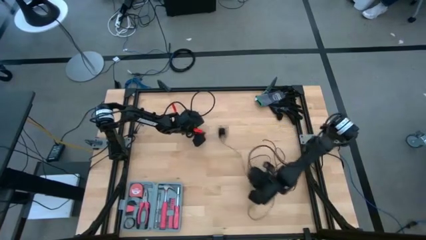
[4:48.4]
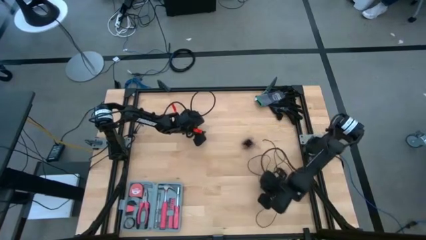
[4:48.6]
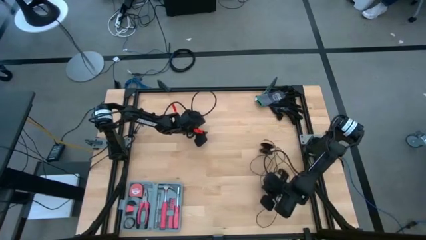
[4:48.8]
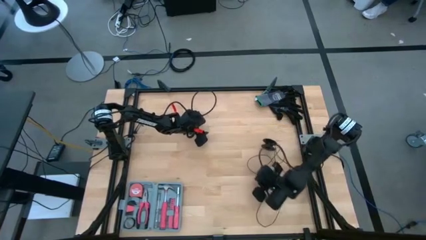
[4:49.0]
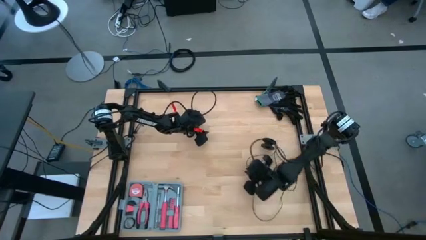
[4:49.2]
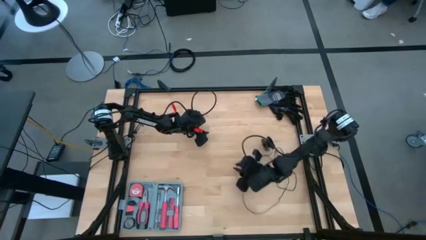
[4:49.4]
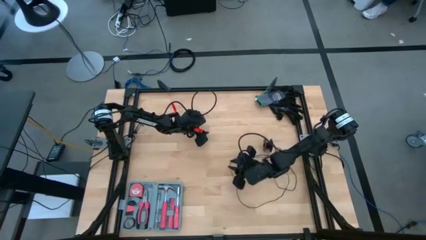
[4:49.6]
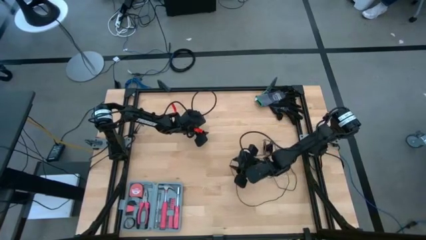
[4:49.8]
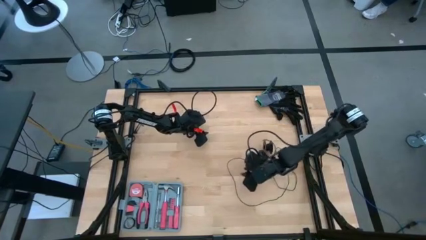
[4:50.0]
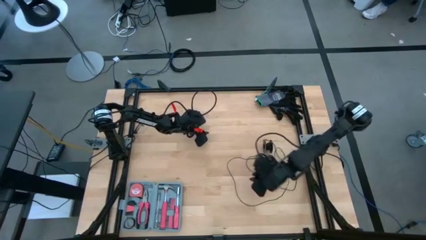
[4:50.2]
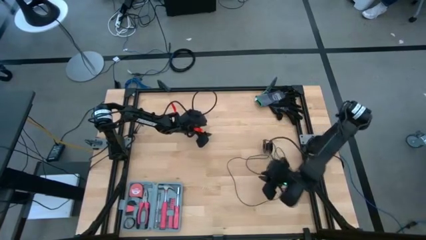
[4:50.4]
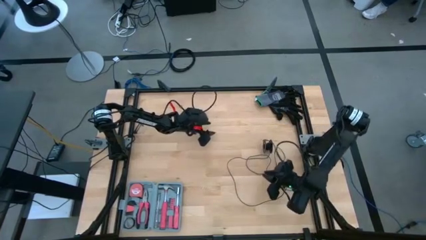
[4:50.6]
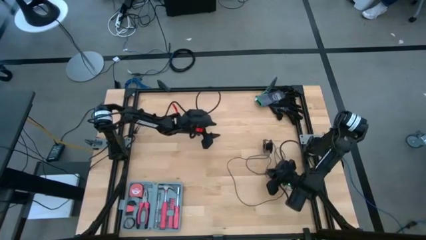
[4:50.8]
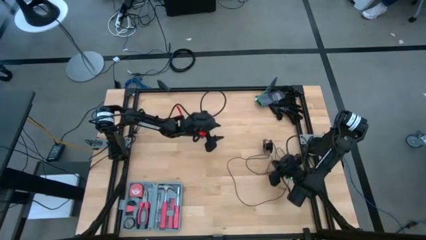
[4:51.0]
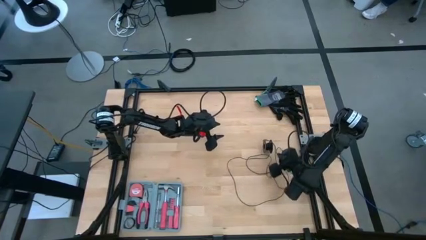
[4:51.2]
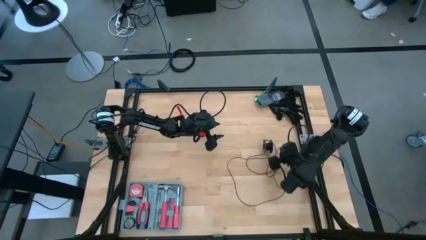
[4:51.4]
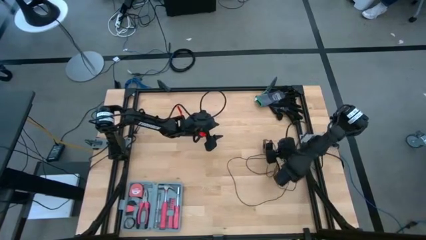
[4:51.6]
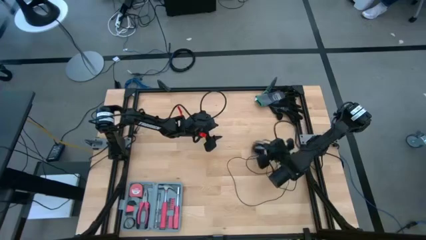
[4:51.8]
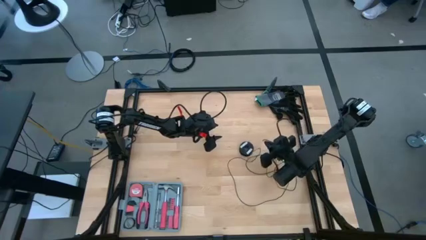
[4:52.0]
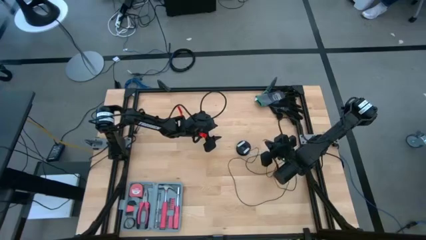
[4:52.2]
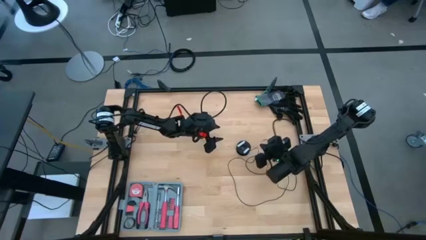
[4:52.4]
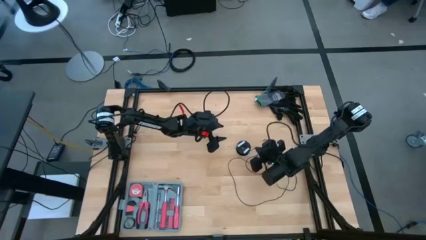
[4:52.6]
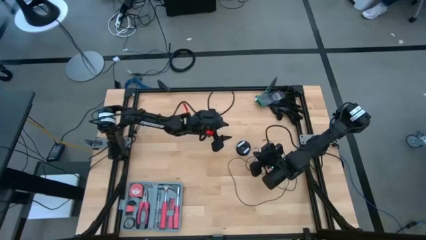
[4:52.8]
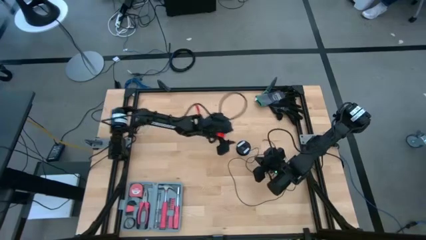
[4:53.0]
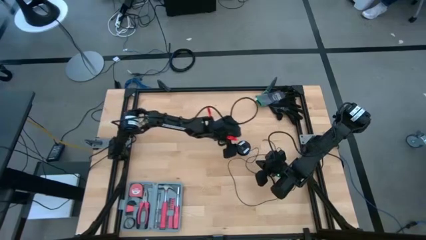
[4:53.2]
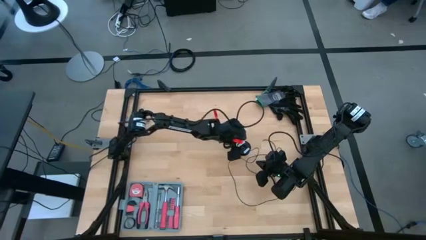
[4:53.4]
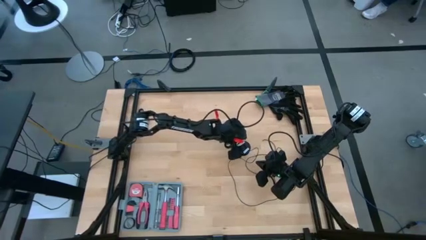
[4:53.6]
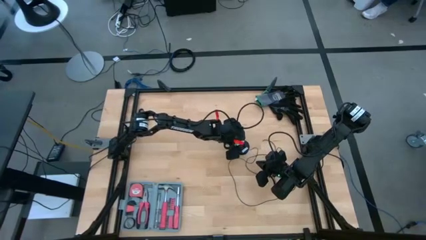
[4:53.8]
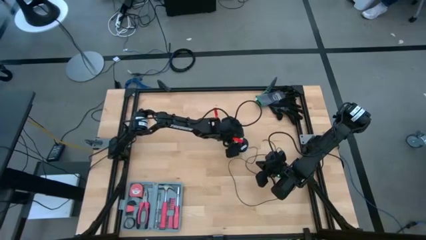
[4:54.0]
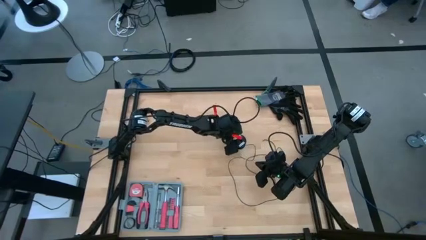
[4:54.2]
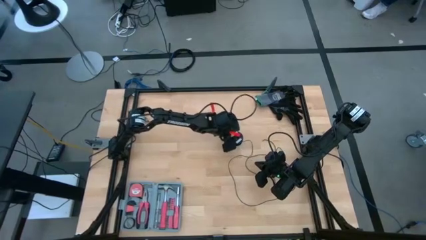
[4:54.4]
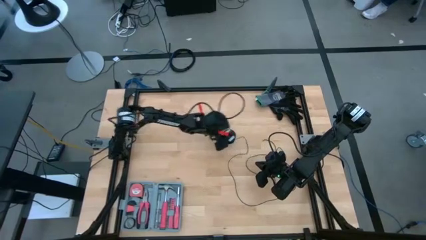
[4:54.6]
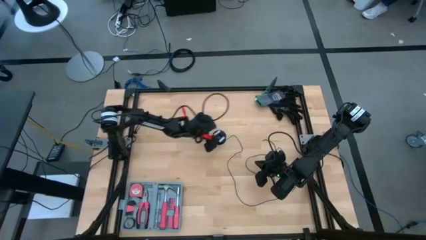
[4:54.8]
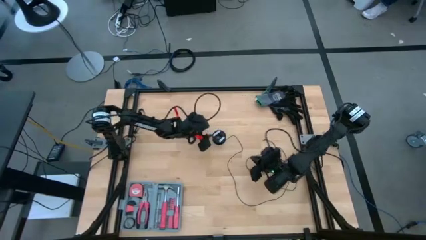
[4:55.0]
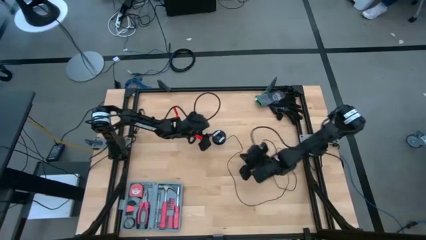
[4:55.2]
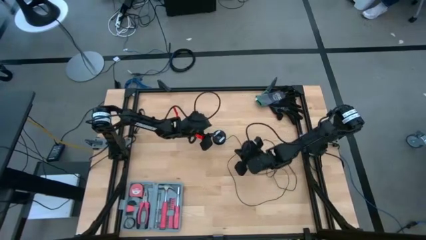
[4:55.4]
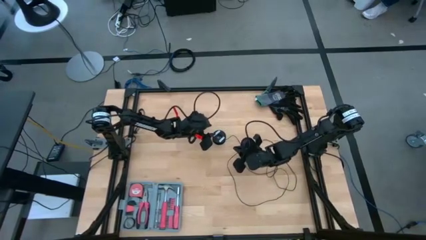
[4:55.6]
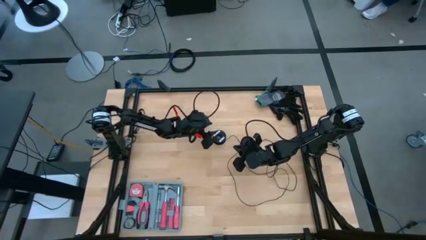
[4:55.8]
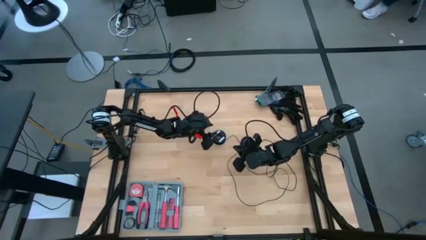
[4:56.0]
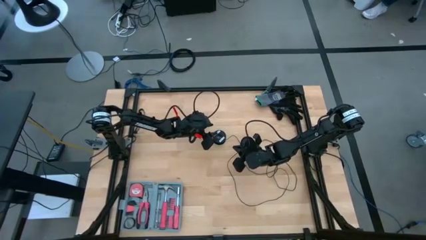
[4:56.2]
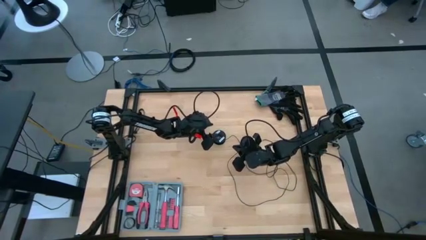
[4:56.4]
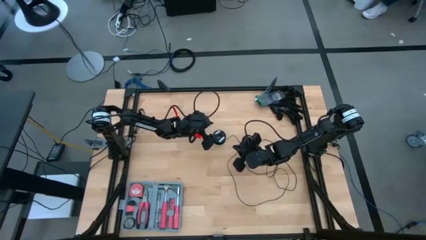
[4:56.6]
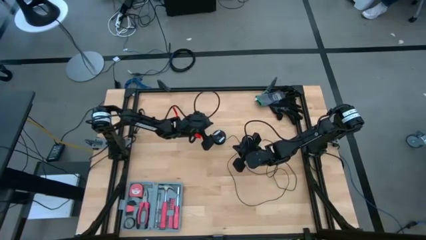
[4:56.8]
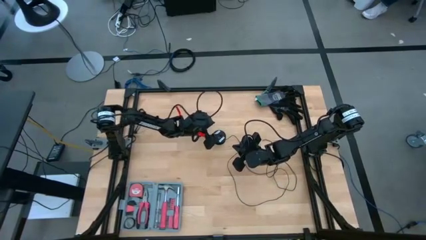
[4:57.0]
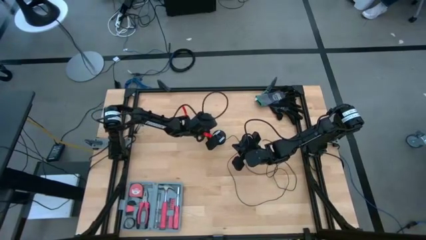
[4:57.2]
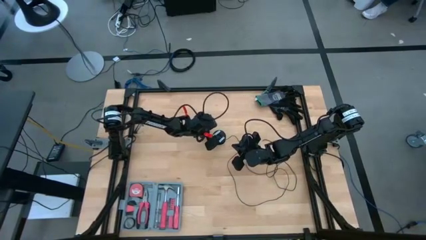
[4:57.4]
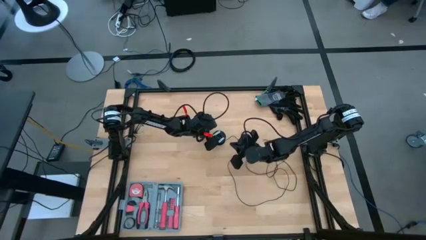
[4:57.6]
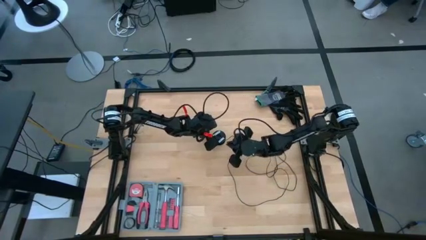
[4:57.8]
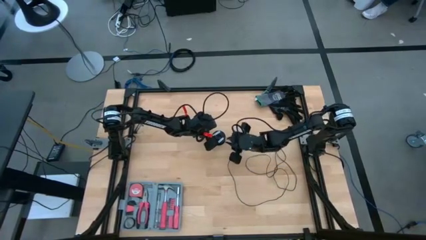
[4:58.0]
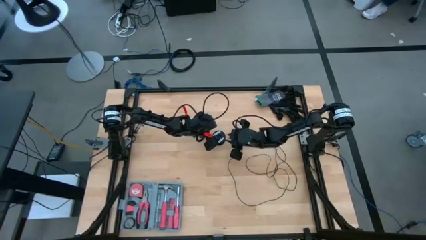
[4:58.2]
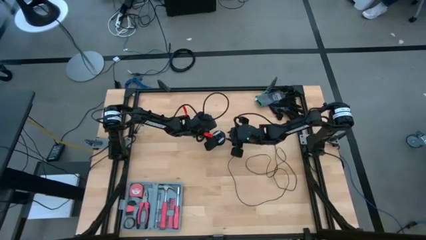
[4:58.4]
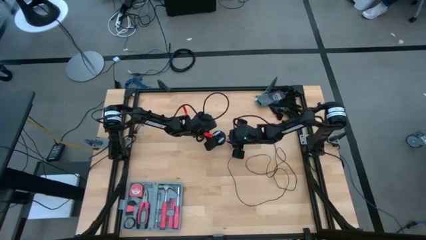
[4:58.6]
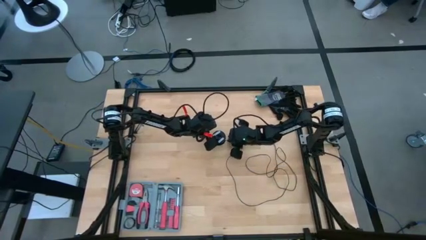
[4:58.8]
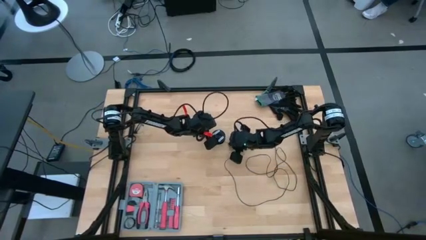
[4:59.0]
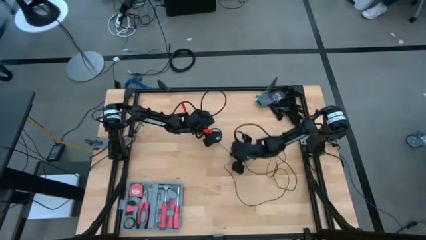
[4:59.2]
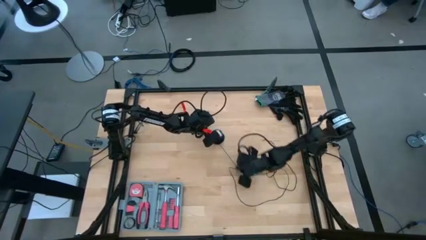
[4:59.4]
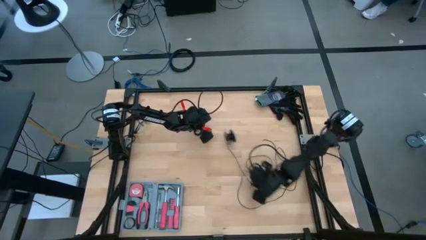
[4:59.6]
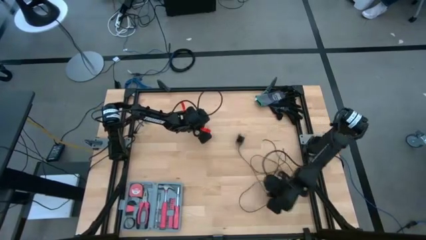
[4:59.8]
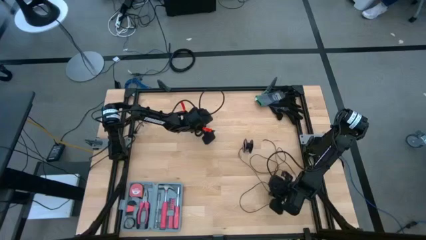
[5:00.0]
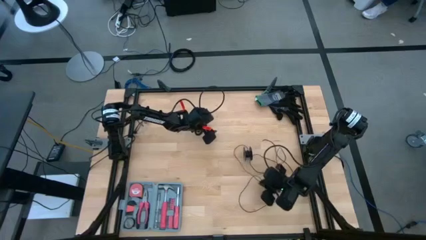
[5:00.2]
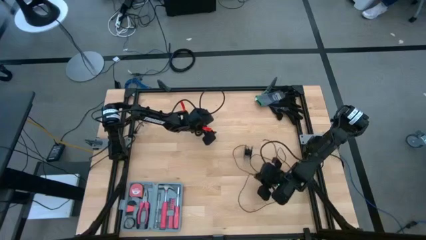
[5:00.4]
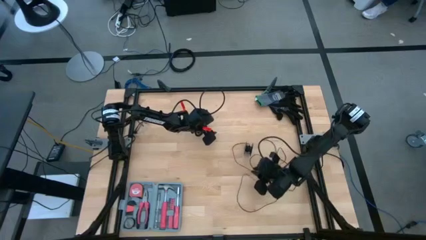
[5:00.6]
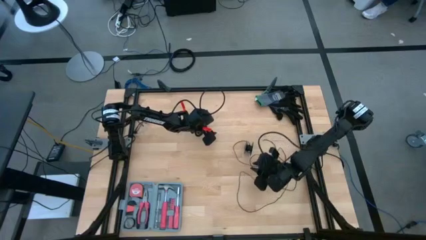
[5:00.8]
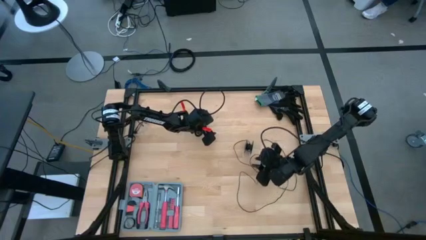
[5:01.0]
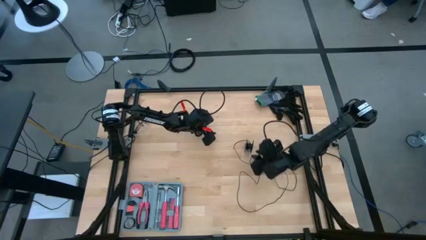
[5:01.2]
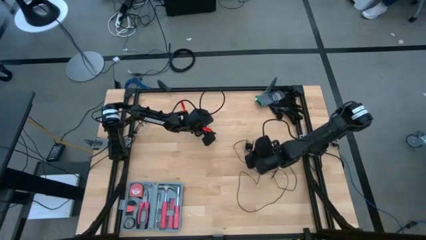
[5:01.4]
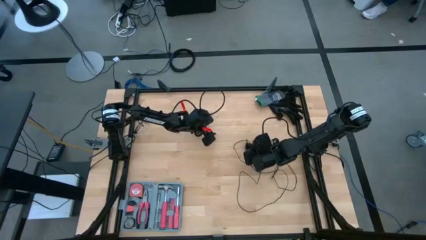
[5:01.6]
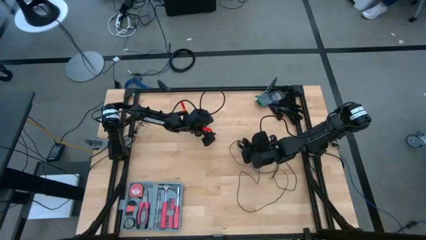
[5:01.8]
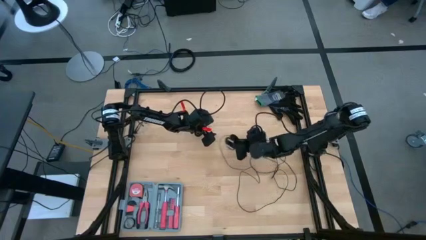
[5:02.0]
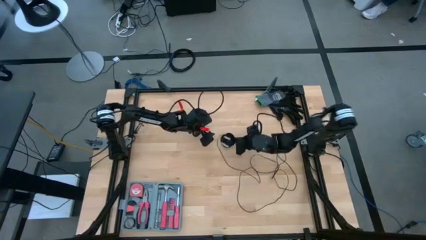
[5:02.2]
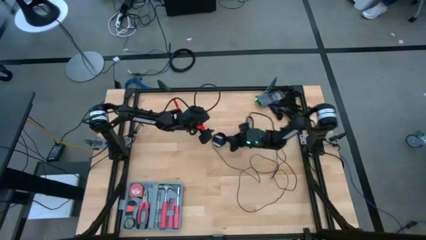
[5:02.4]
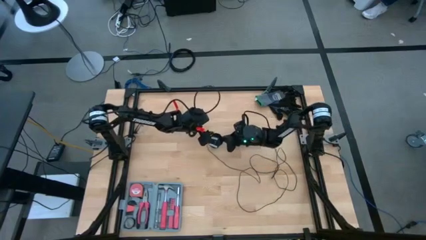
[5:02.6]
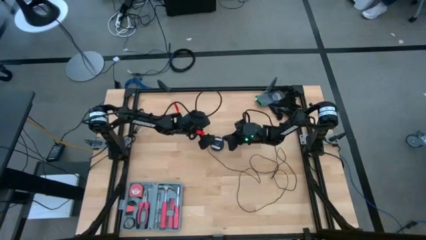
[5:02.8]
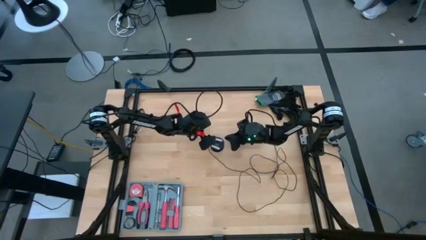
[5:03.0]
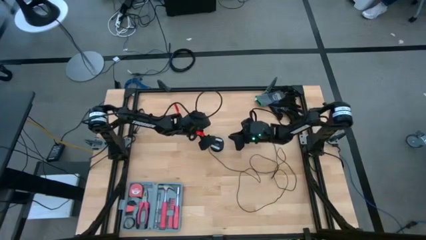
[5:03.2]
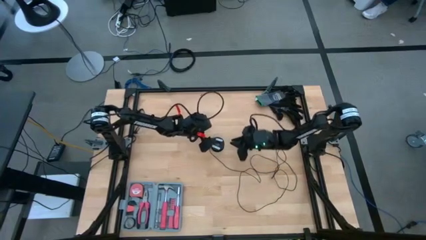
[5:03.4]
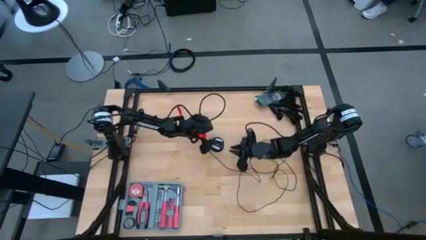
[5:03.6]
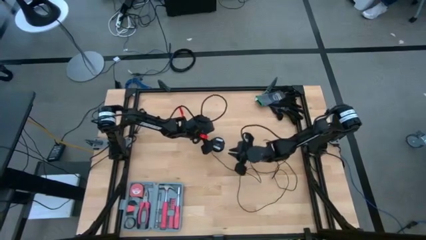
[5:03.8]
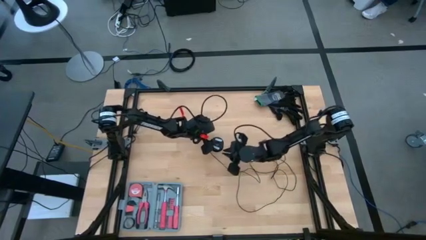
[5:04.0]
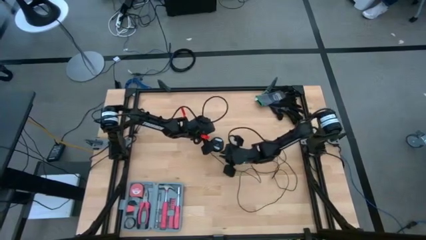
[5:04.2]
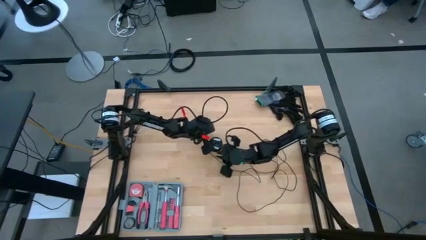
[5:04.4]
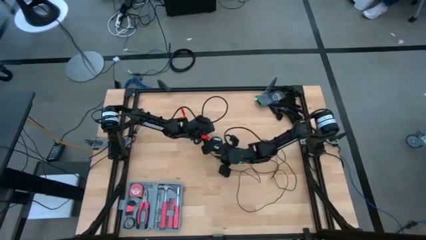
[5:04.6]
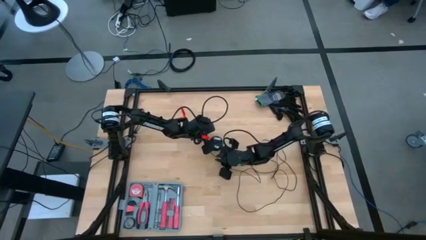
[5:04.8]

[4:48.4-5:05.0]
Task: Coil cords
Uncoil the black wire from the spool
